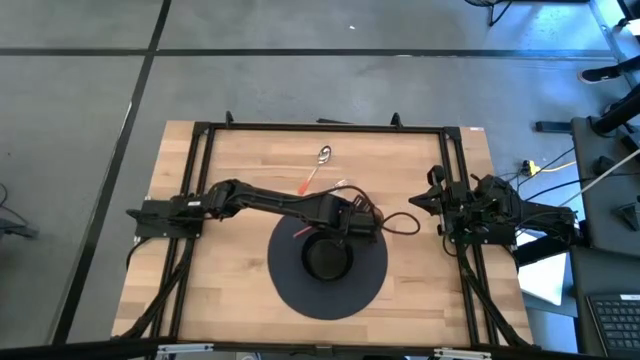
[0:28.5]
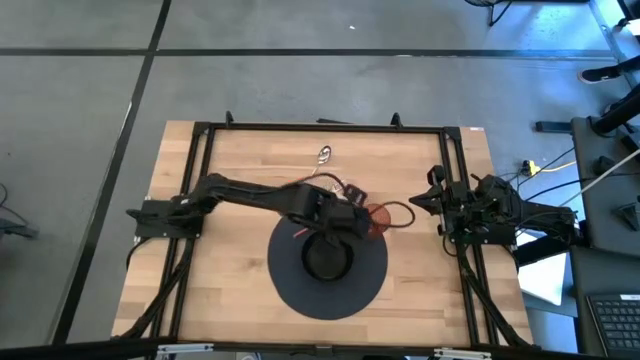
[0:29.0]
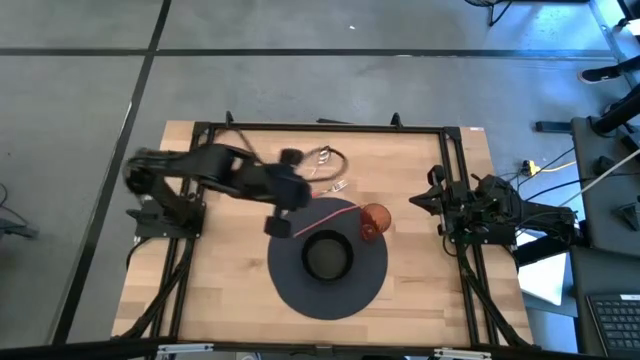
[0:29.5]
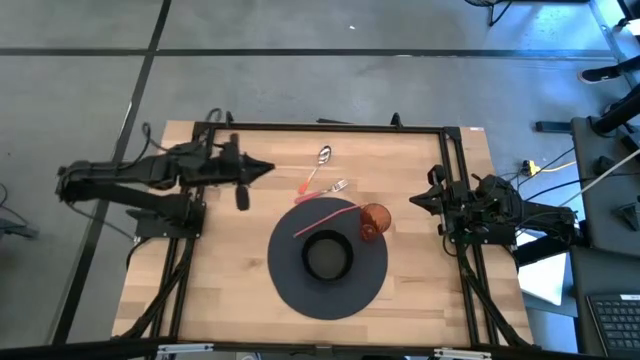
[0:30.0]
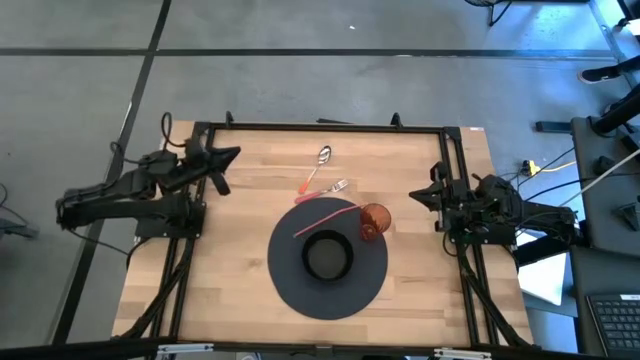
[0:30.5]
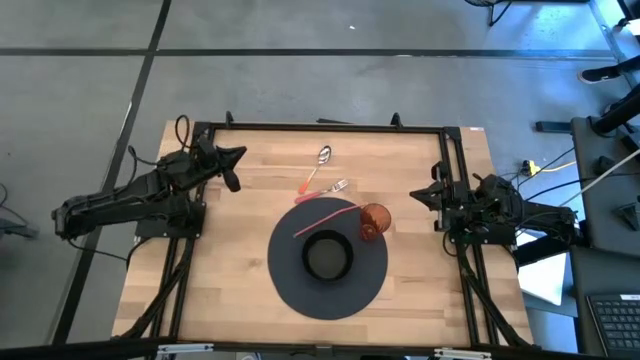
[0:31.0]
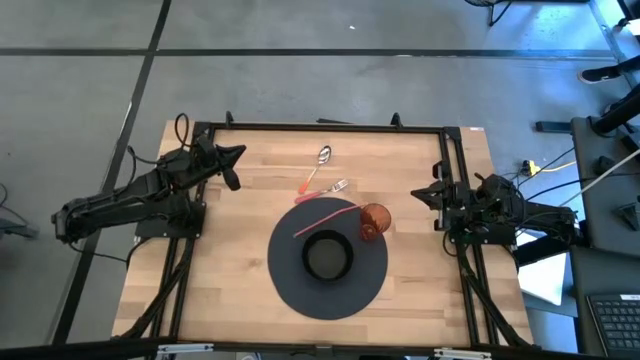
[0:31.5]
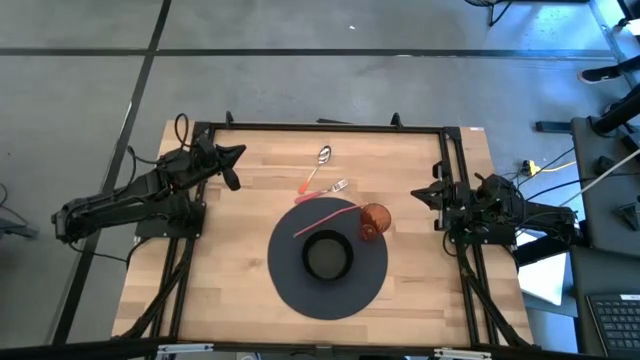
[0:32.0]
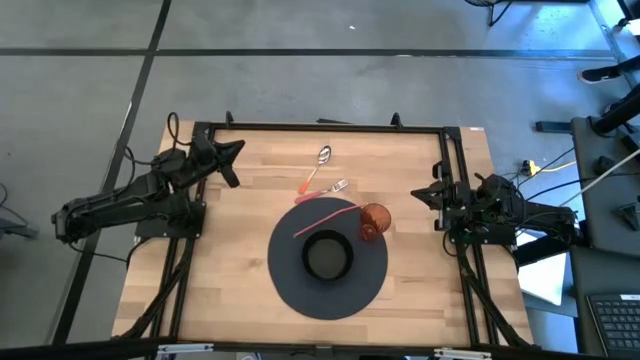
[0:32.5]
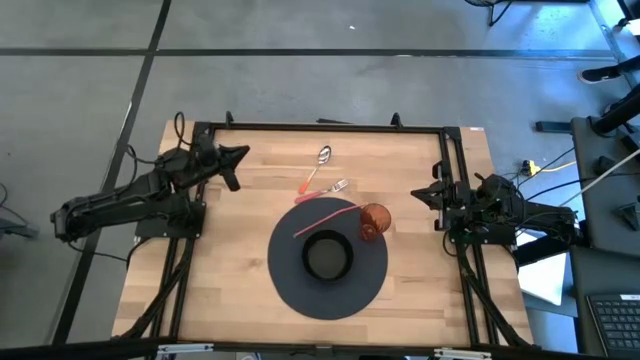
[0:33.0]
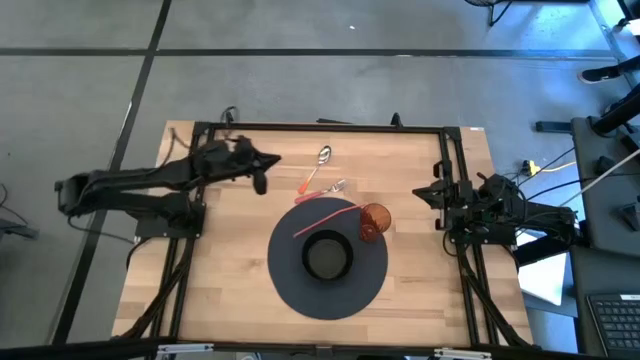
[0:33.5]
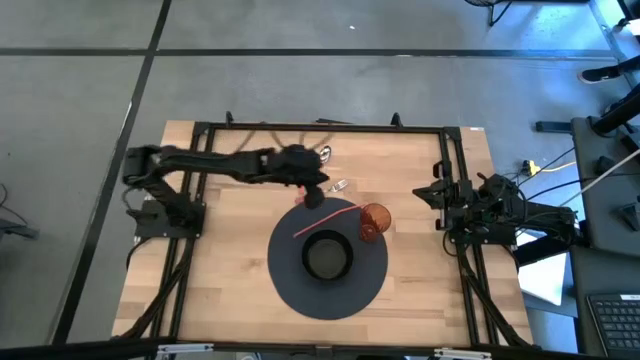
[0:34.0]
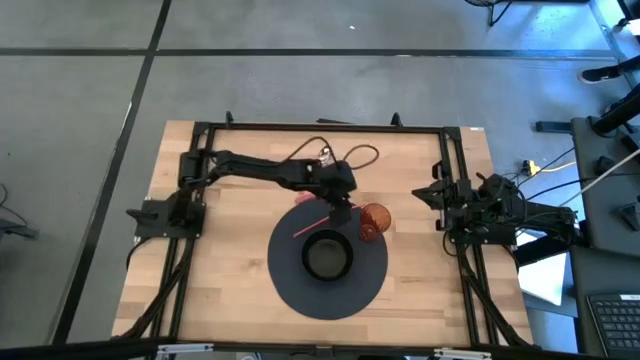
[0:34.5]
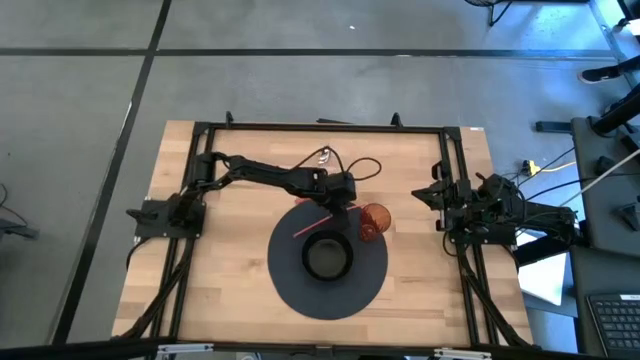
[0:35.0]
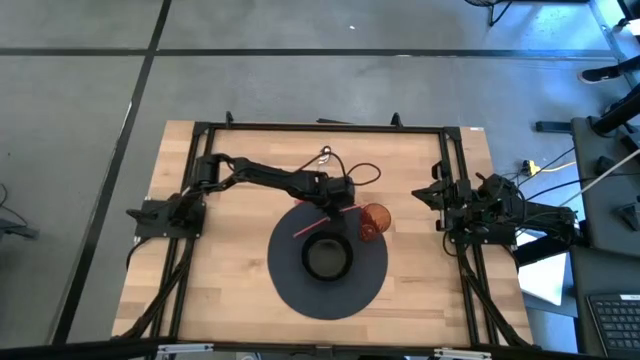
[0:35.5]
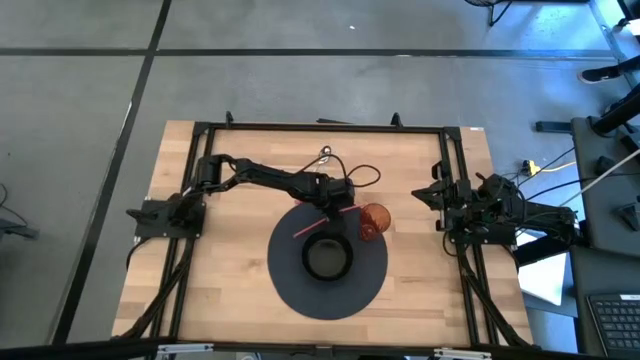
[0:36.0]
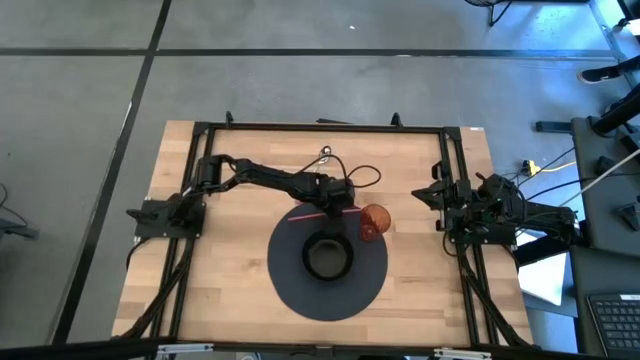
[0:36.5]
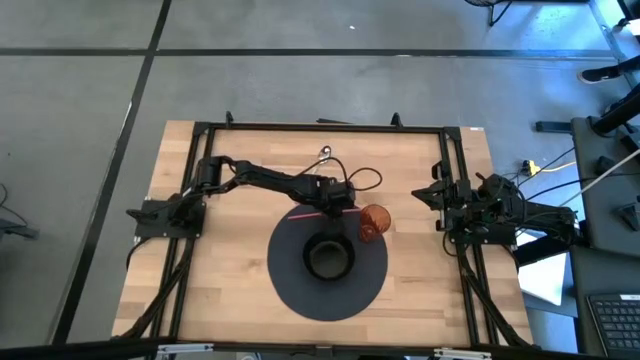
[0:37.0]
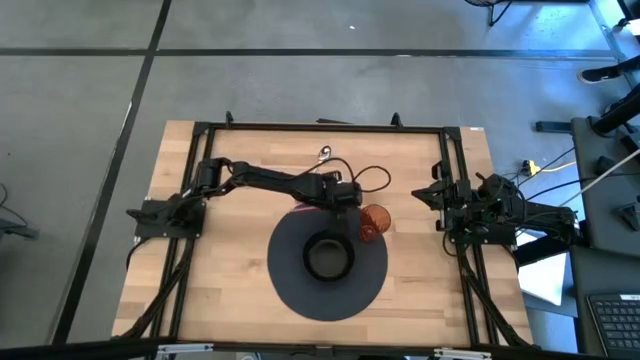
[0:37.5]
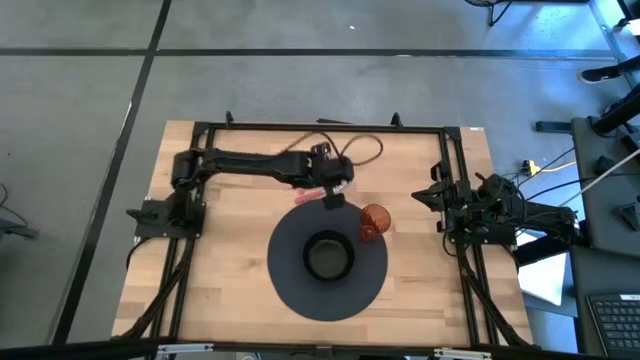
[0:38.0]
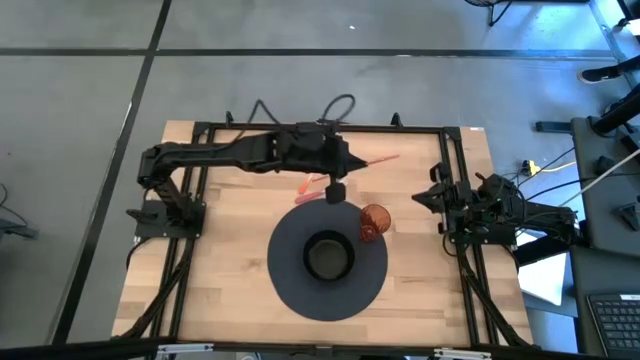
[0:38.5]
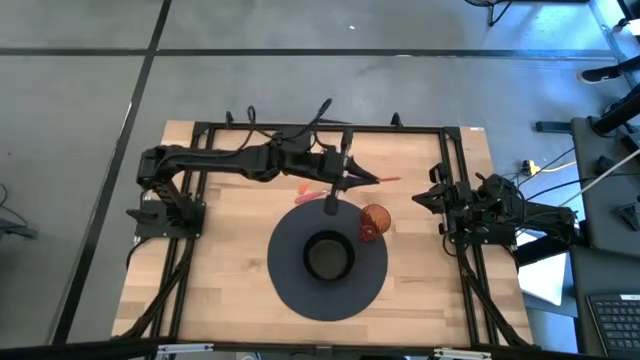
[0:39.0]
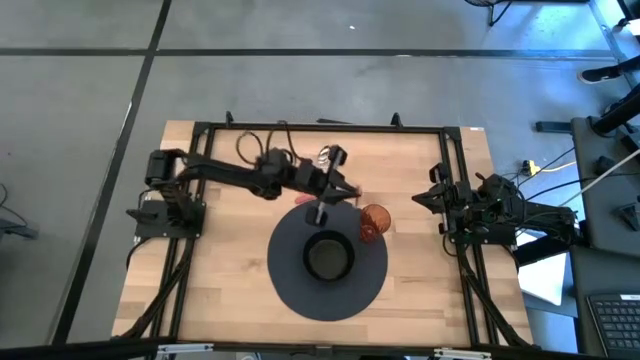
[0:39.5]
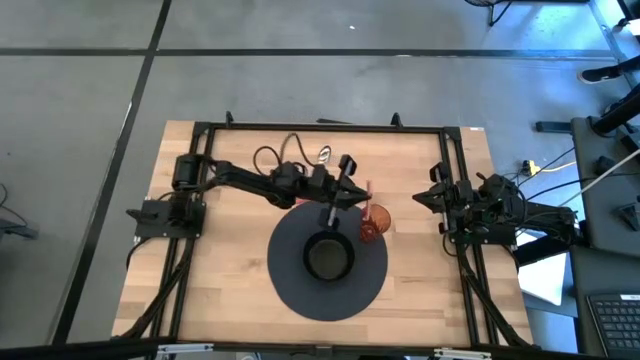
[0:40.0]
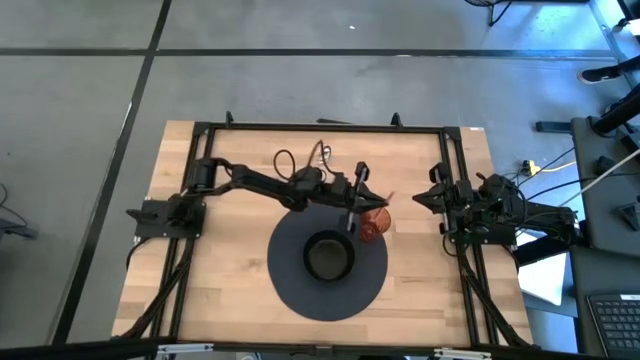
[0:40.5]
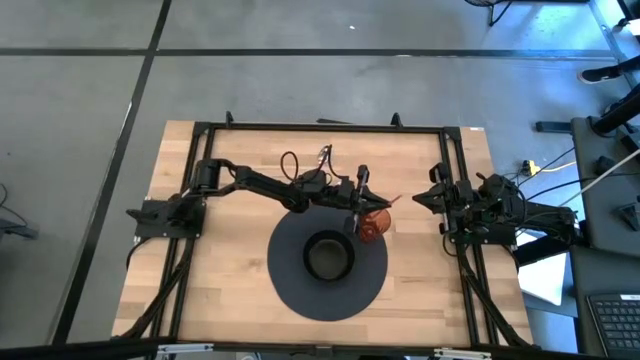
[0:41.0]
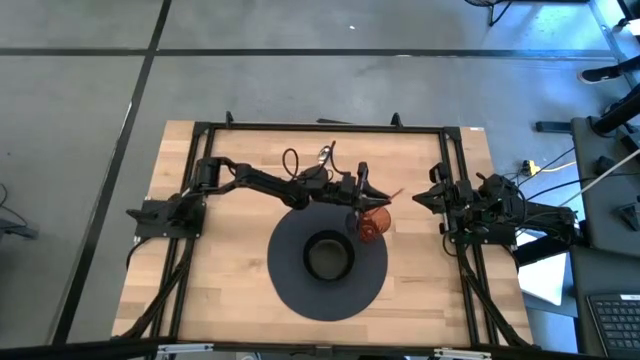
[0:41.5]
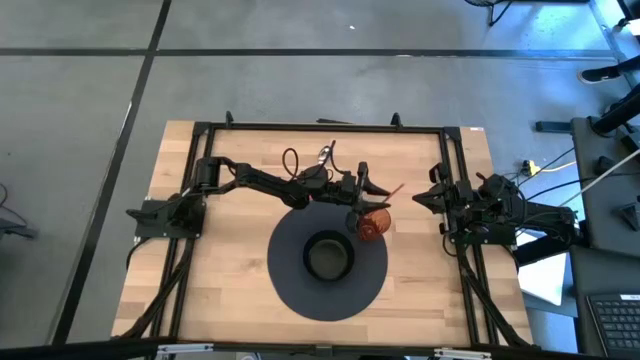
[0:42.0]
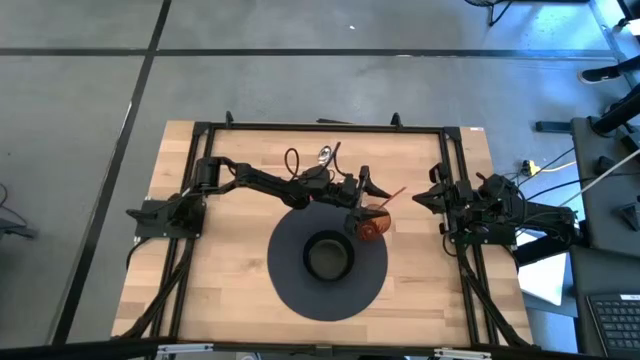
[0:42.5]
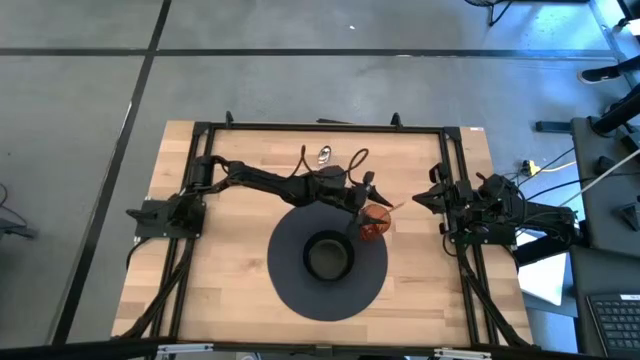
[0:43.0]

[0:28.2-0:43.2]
Task: Pick & Place Utensil
Put the orange drinking straw into the orange cup

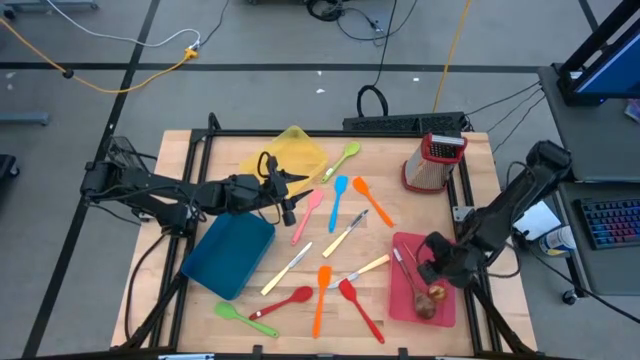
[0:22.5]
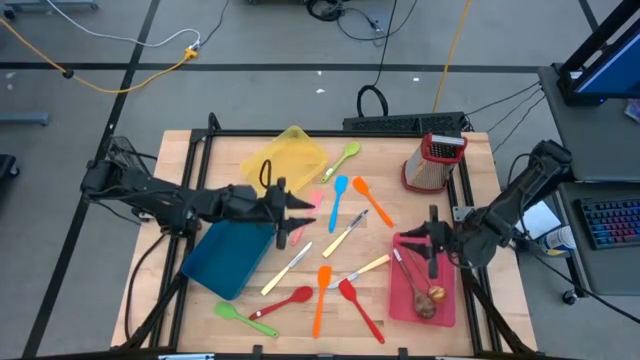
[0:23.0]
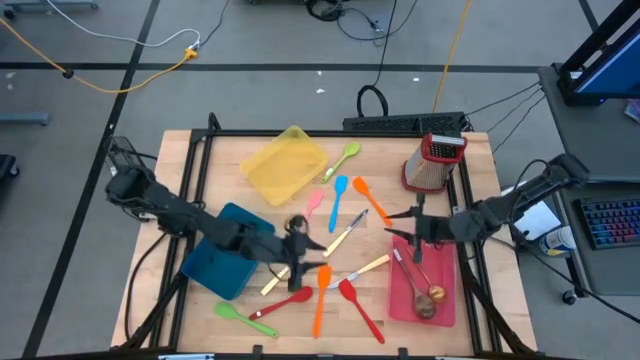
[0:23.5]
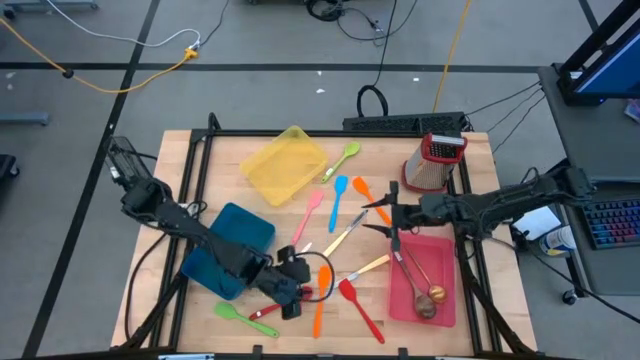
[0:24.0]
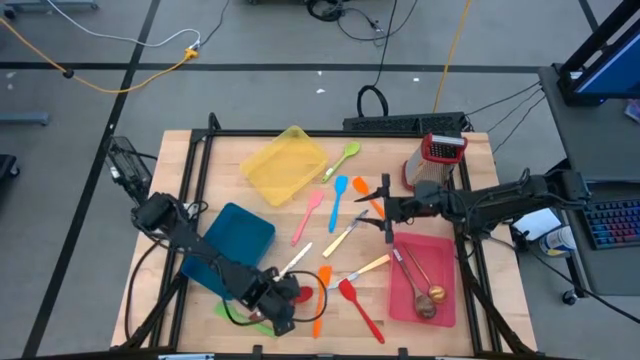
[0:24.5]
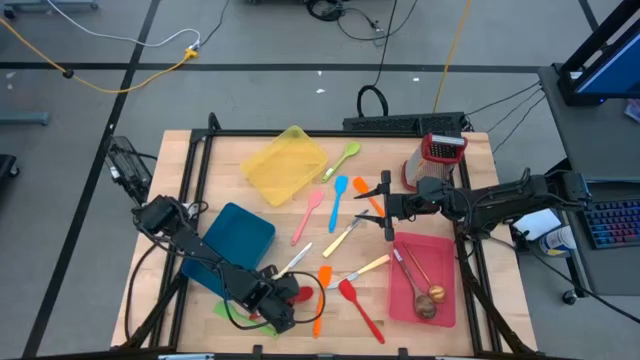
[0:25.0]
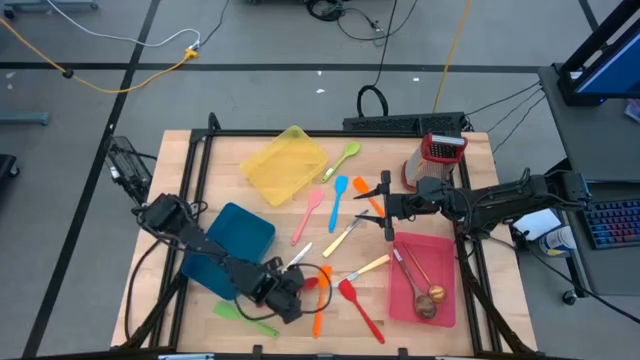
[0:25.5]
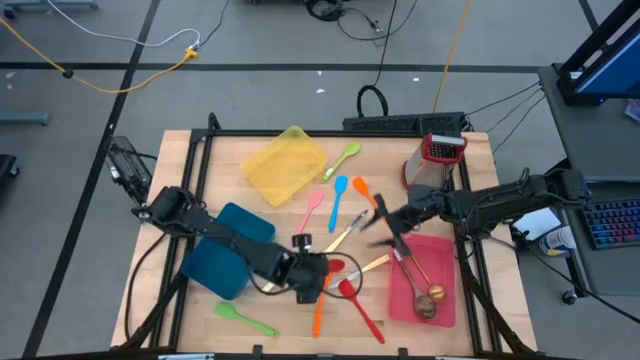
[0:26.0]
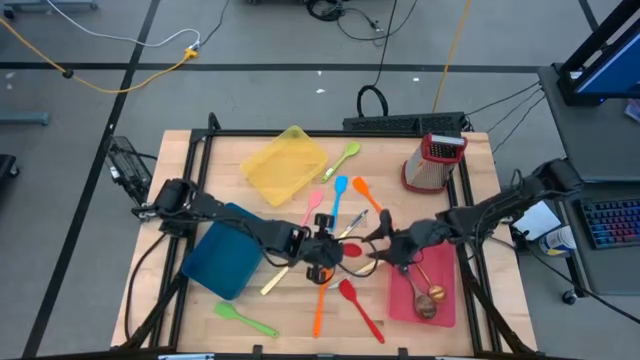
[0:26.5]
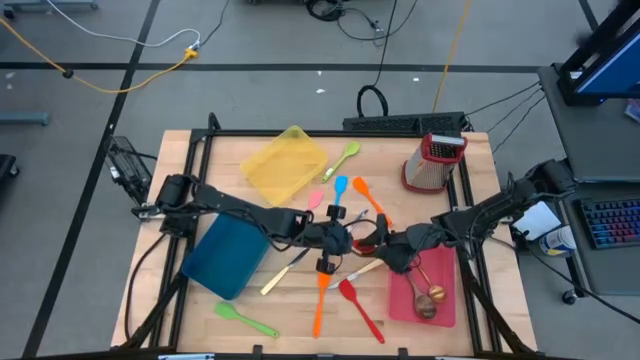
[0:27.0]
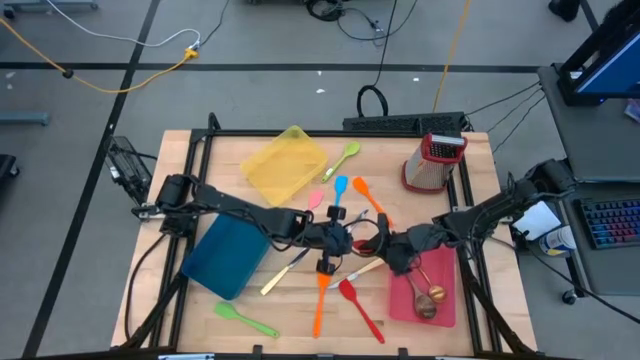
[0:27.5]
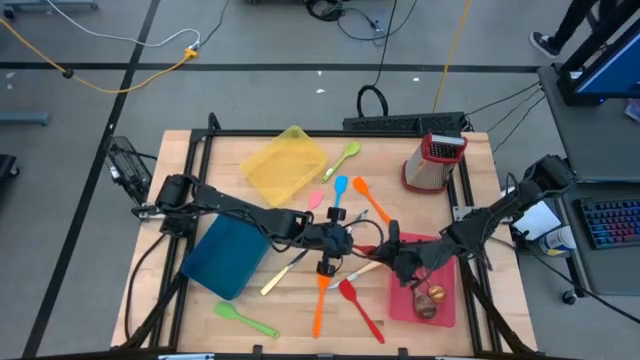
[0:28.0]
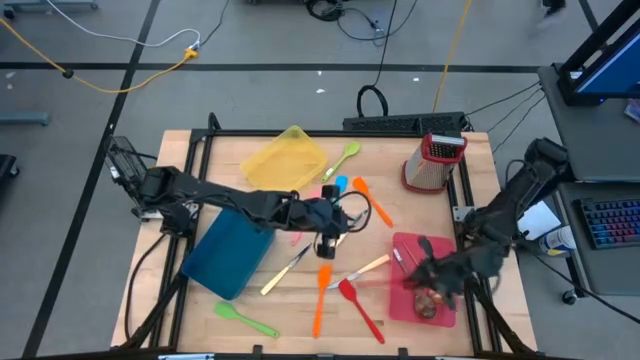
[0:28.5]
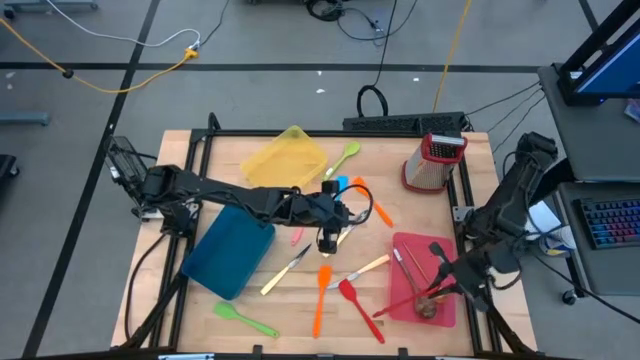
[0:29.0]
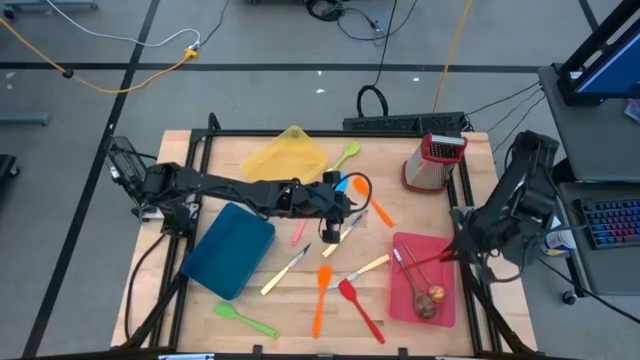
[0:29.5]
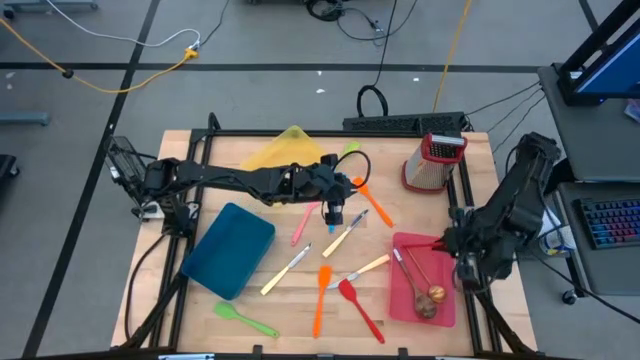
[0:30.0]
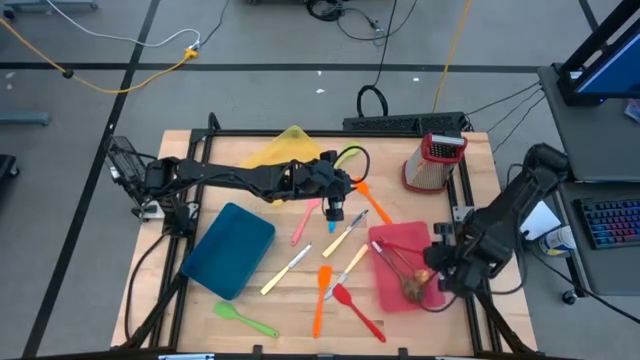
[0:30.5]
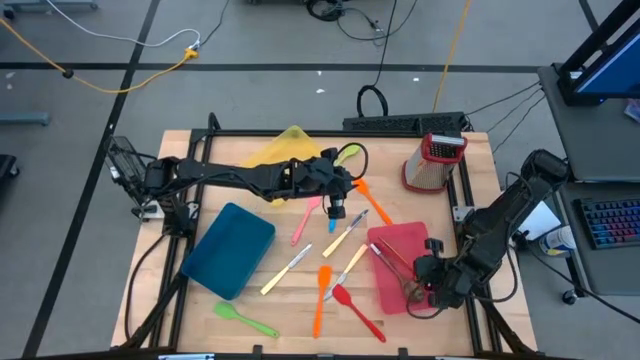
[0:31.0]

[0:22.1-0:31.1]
Task: Pick & Place Kitchen Items
Put the red serving spoon into the pink bin
